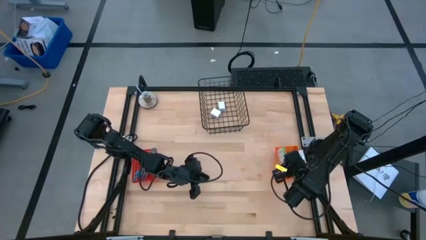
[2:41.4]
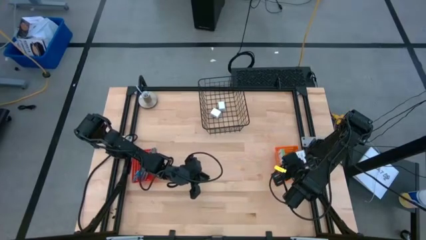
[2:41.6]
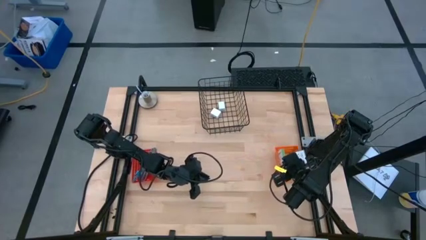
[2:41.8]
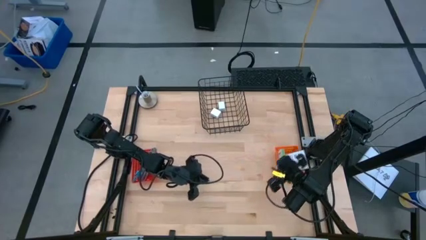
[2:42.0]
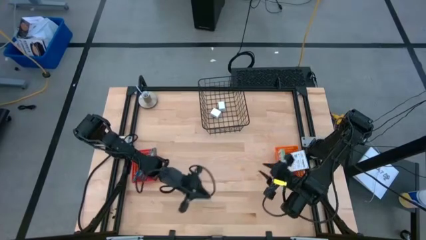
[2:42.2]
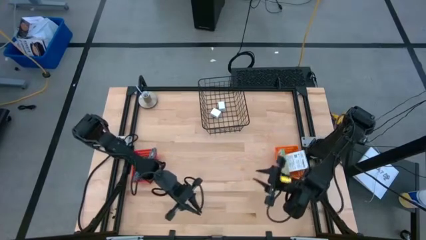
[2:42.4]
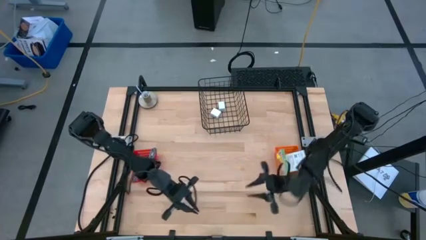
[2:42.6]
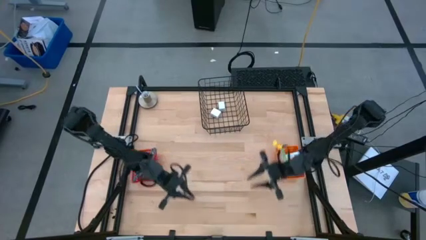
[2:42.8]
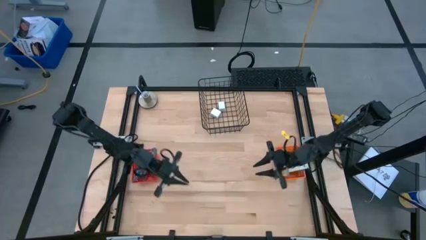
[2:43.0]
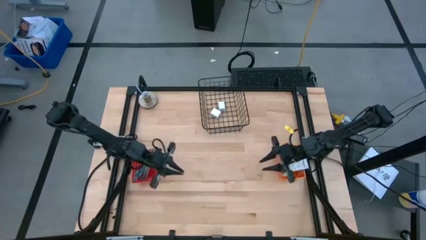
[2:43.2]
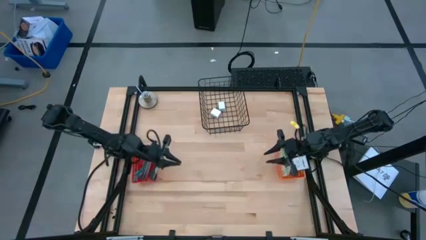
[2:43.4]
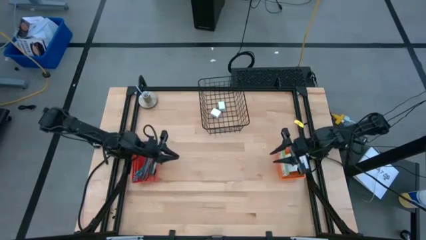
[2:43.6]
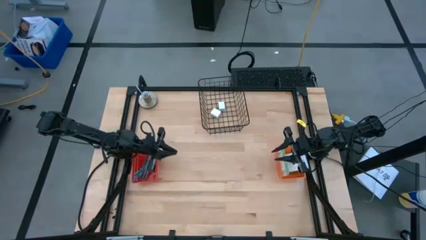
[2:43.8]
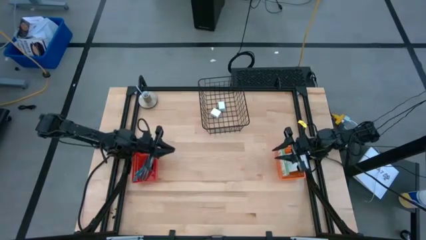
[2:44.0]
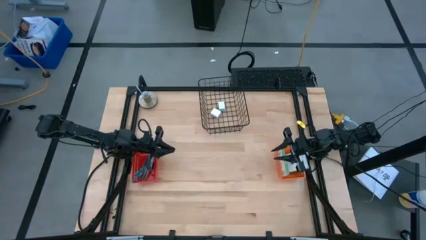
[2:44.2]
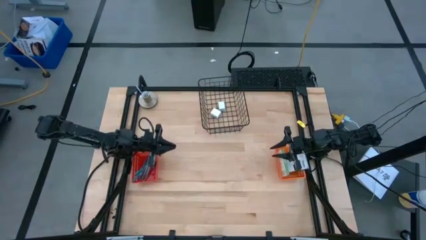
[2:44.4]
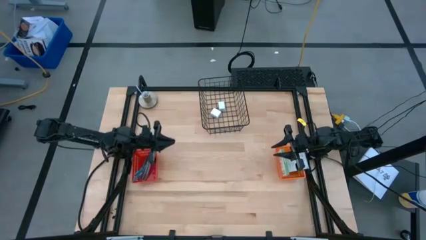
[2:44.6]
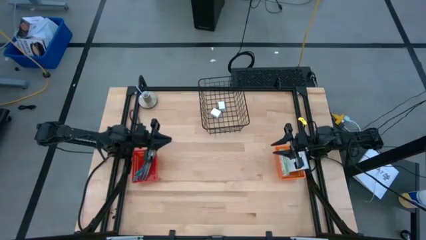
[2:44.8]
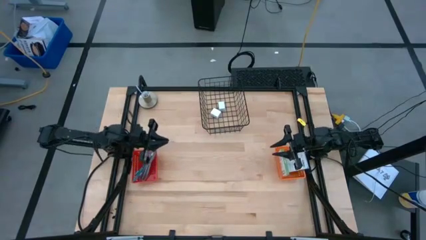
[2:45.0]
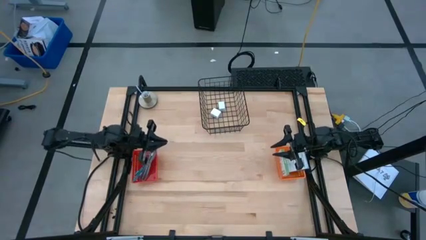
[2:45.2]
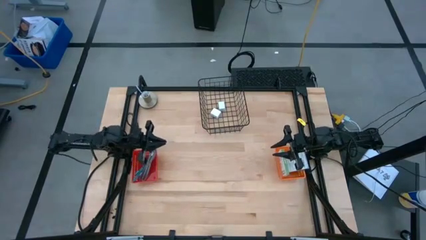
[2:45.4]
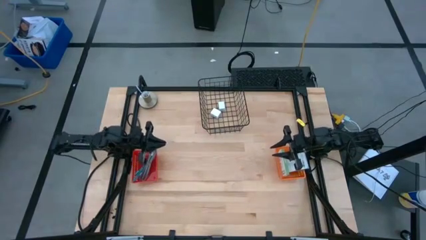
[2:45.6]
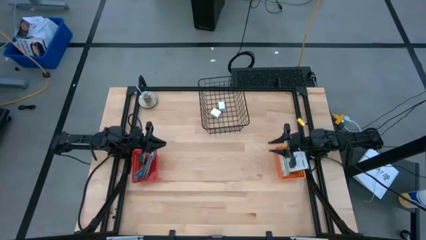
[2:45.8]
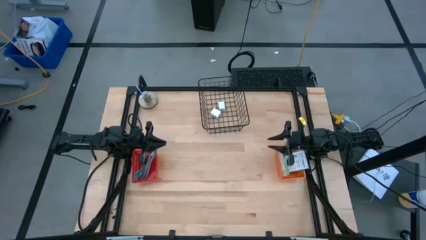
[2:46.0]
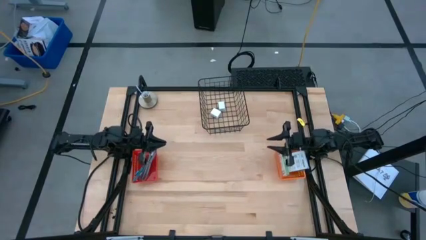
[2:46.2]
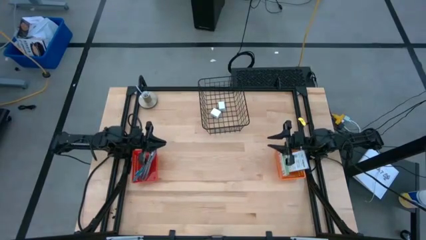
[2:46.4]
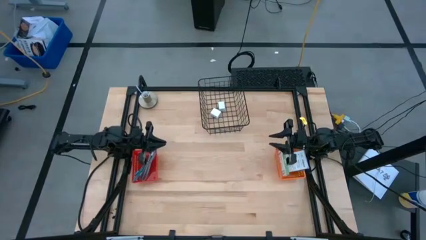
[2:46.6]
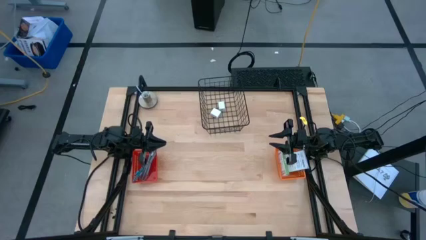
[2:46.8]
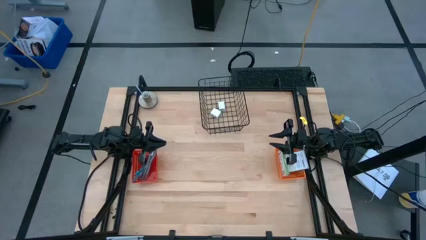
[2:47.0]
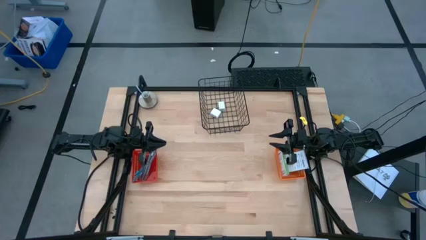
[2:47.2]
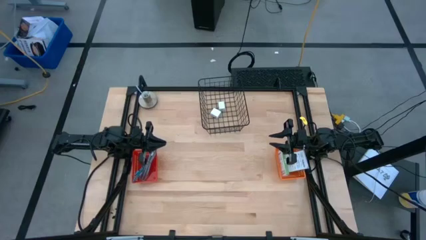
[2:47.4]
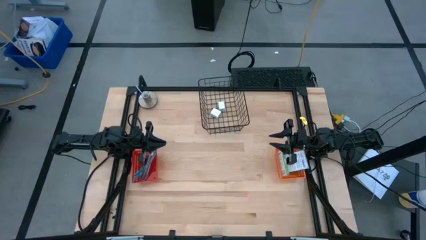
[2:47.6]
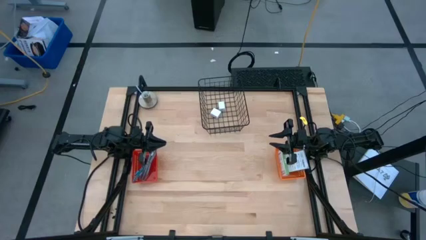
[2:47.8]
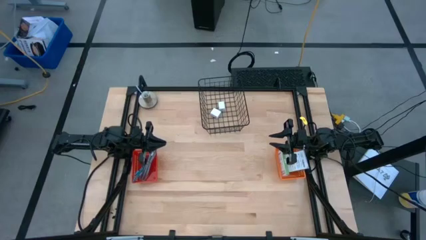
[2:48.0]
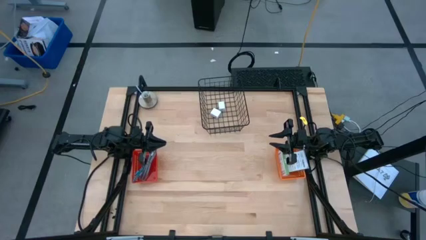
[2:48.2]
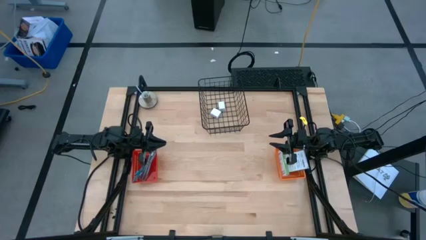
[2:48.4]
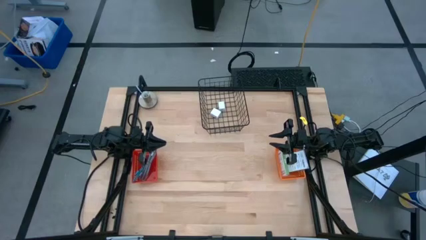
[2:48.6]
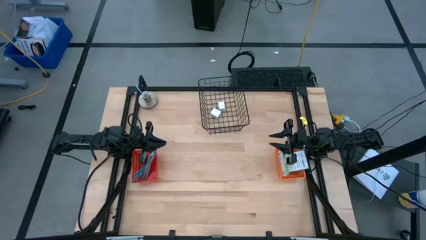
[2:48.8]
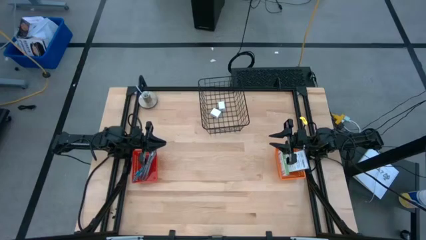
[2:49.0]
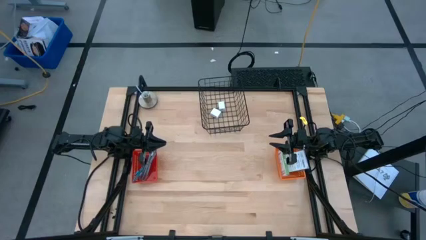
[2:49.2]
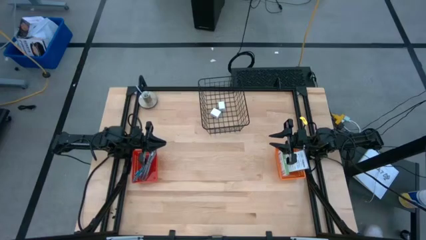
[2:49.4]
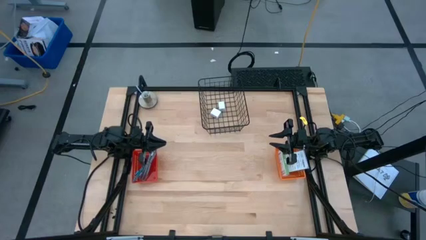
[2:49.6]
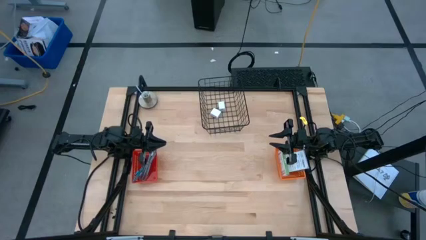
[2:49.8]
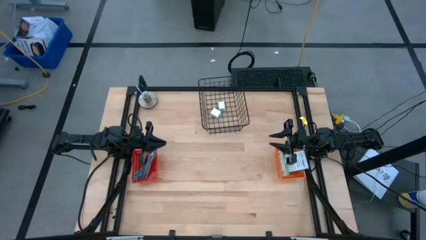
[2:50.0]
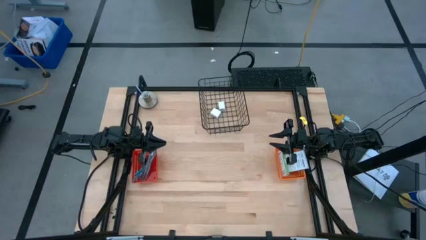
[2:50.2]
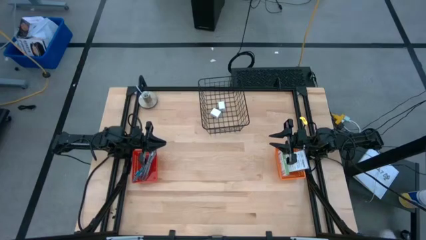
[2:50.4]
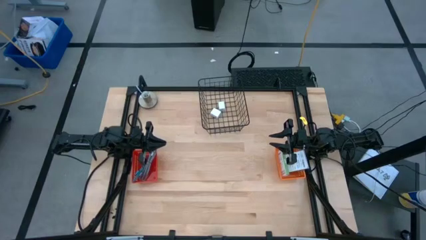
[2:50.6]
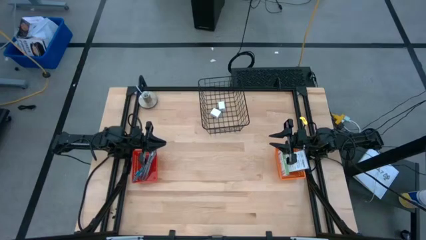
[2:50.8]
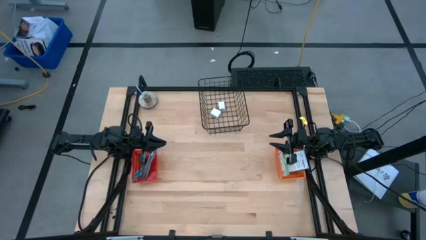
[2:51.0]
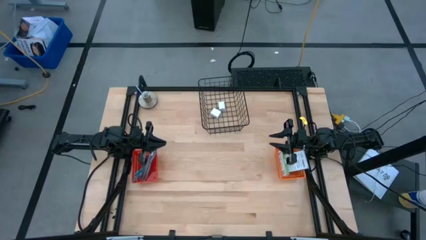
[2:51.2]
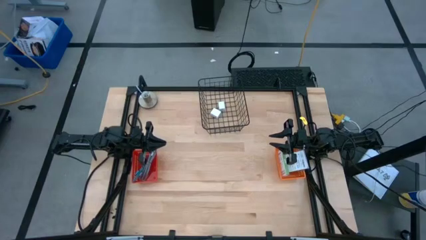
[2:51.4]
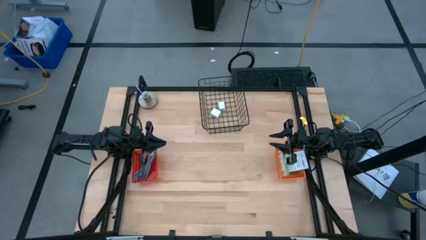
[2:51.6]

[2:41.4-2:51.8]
Task: Pick and place items into bin
Return to Home Position

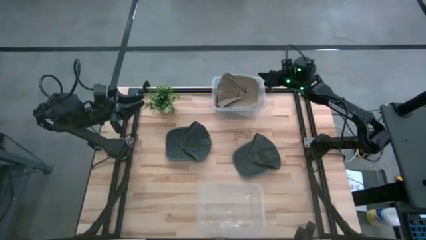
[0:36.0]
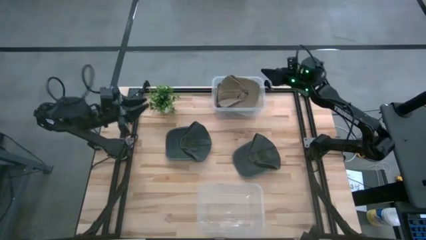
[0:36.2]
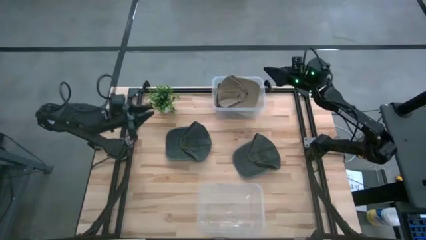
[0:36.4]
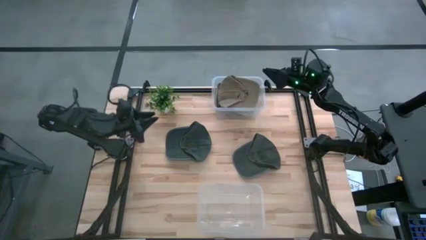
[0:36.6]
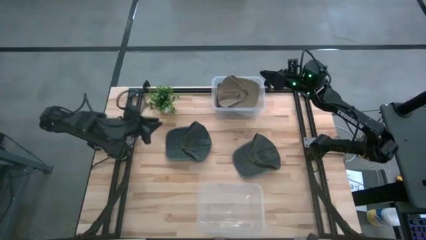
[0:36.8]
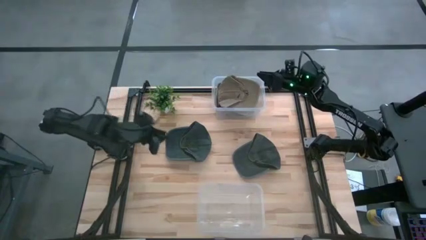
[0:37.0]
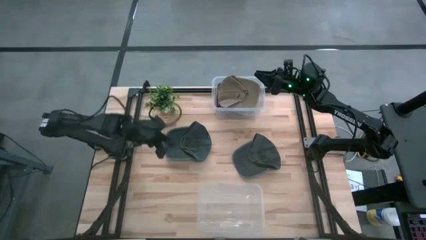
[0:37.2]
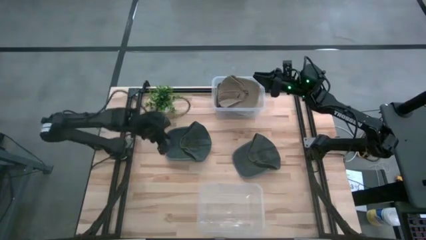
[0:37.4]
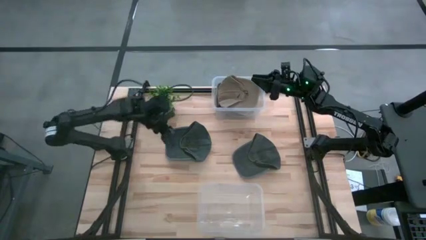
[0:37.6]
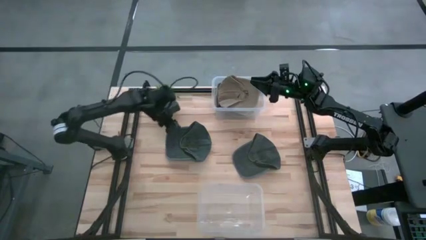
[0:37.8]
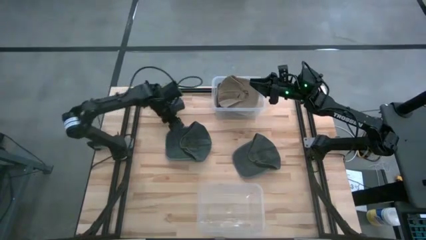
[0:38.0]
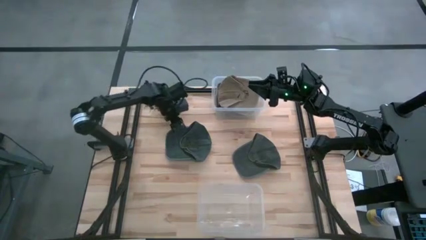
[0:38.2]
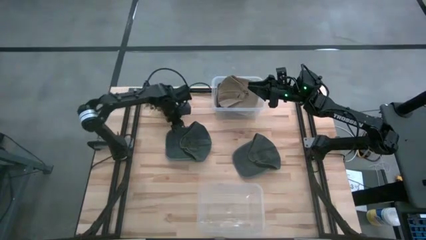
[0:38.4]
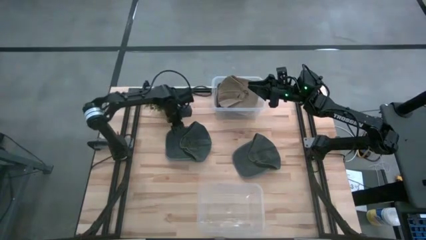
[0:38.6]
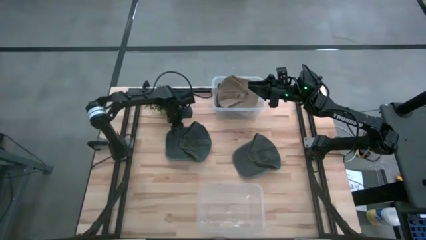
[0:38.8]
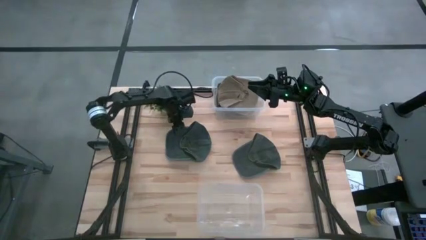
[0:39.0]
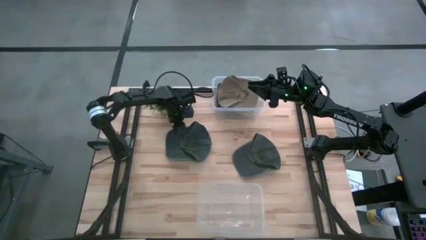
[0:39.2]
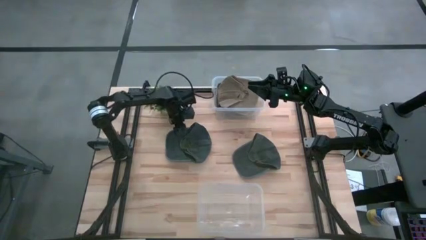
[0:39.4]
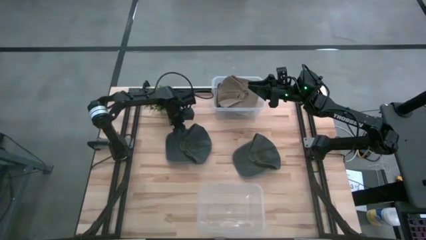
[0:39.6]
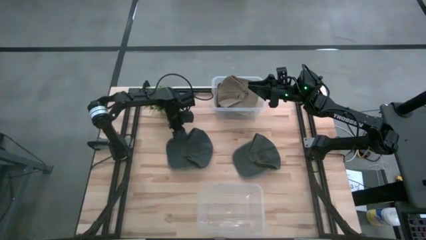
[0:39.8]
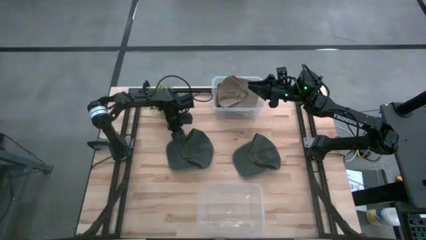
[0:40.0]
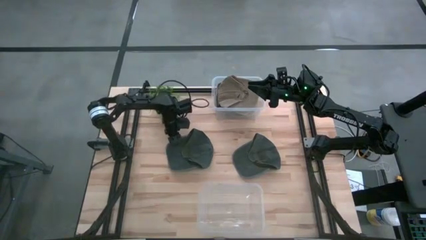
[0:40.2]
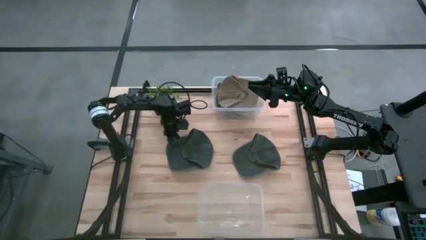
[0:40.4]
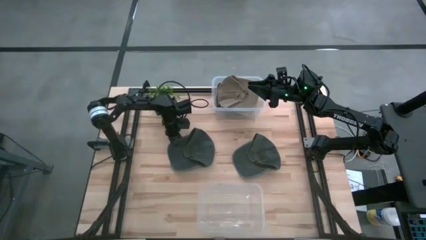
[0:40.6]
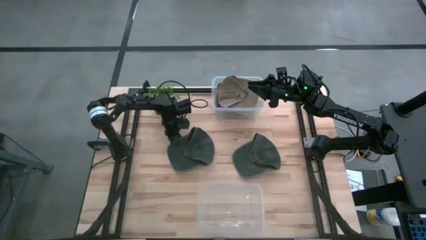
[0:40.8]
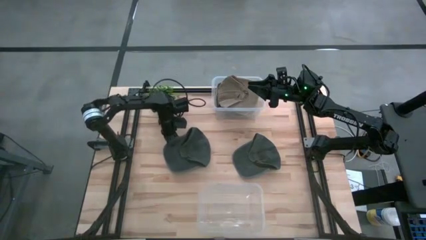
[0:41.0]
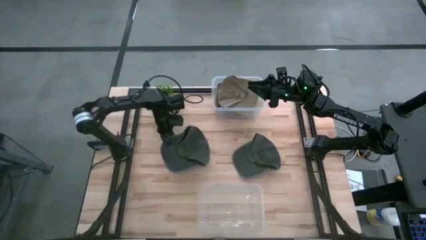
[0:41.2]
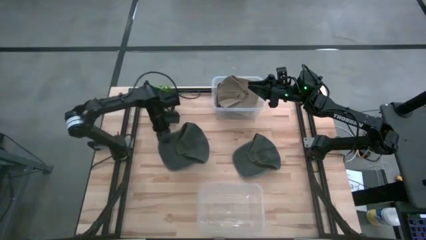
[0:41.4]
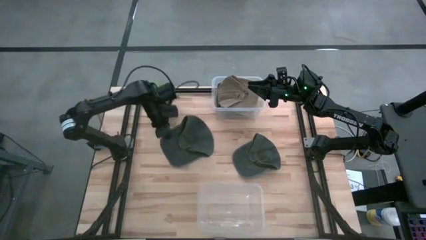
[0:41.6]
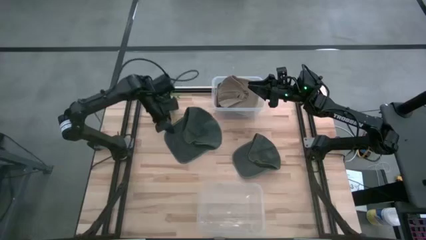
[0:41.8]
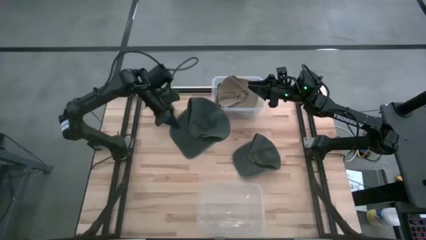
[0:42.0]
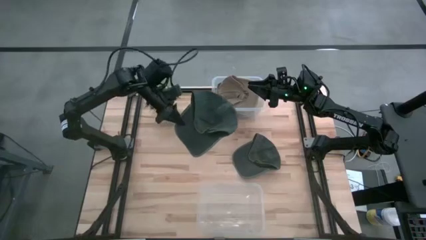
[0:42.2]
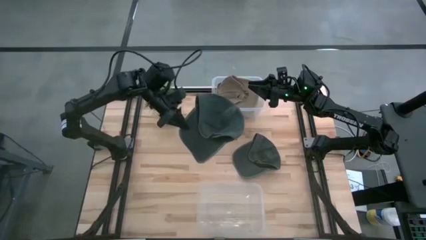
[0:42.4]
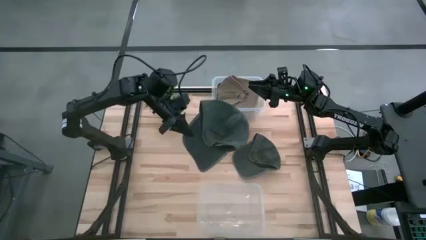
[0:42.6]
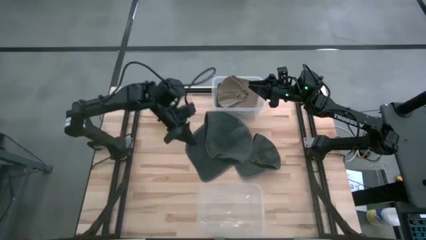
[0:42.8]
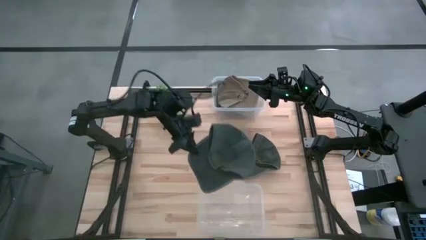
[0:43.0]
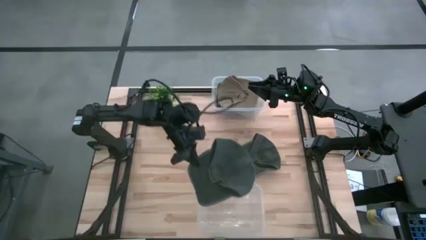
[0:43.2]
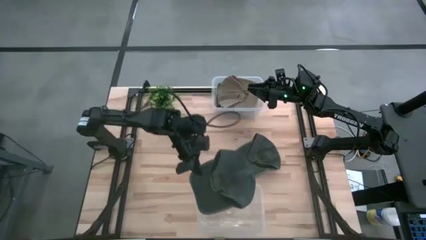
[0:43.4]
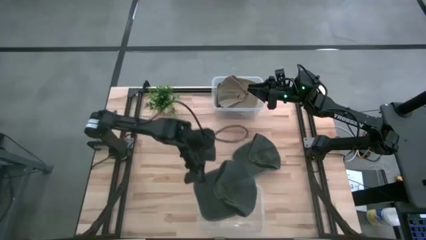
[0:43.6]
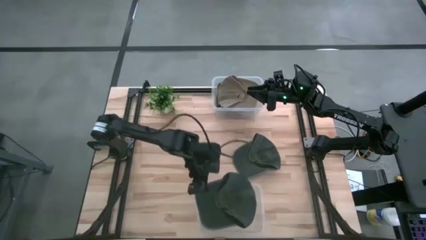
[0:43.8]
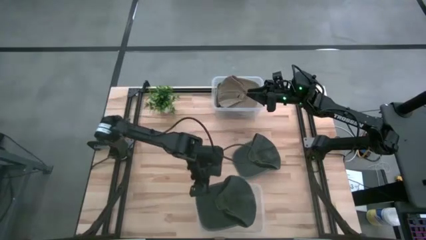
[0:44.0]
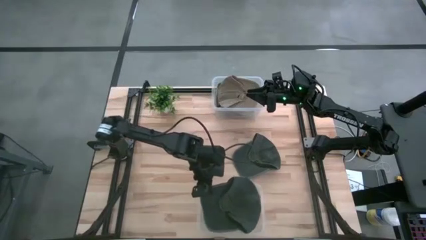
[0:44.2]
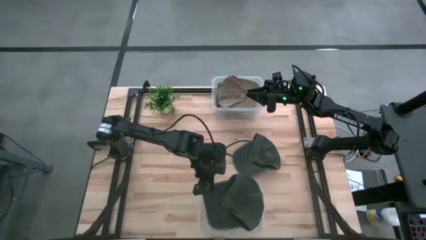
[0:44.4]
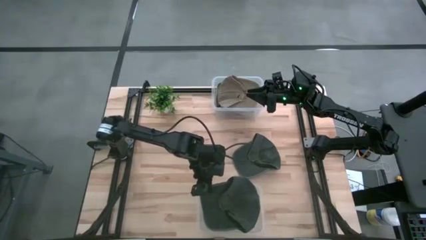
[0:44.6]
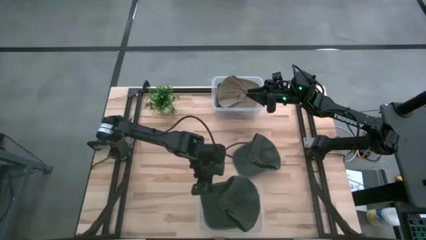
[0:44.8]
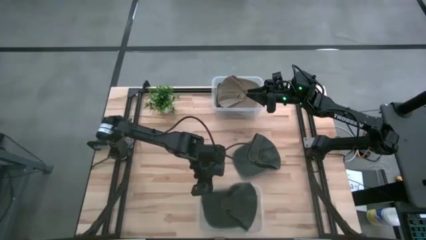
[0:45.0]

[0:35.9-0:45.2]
Task: Pick & Place hat
Put the left black cap into the bottom transparent bin
